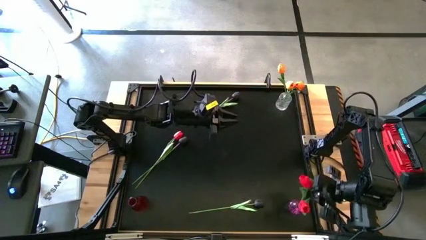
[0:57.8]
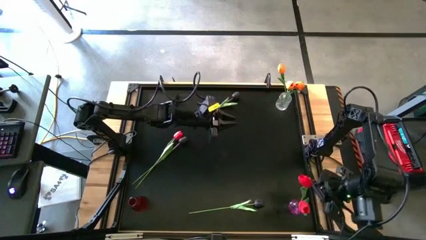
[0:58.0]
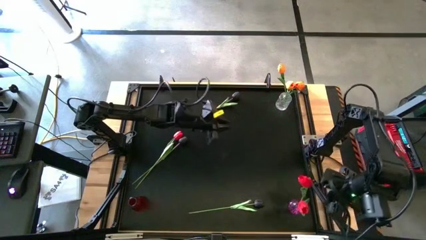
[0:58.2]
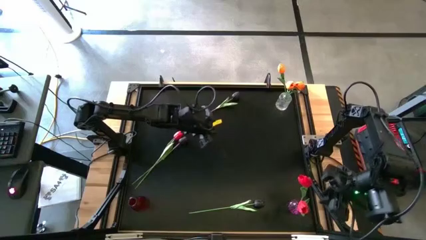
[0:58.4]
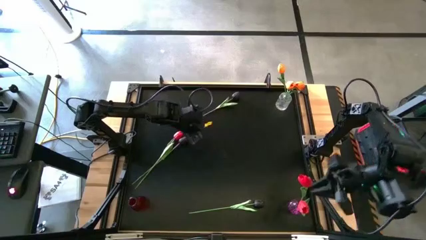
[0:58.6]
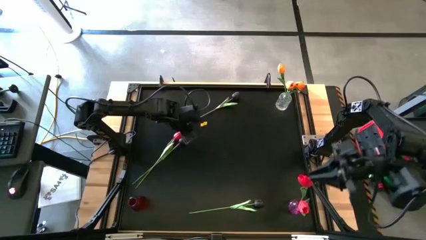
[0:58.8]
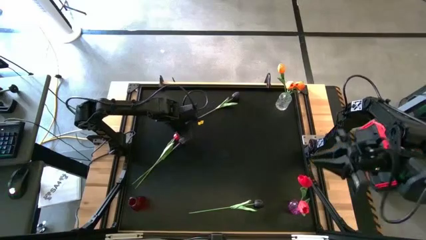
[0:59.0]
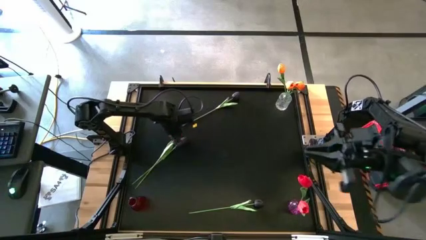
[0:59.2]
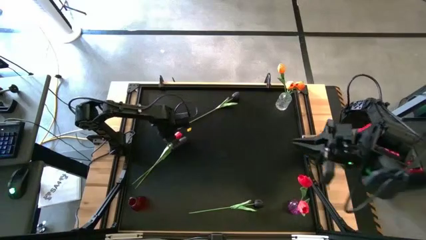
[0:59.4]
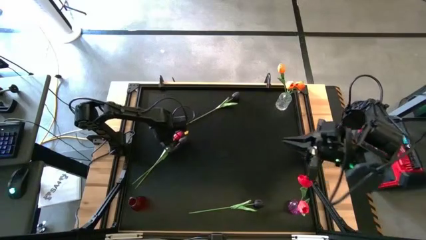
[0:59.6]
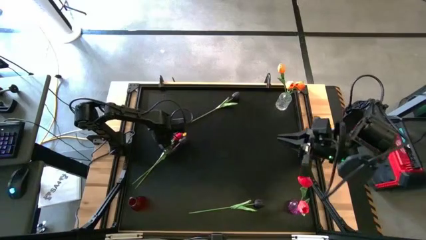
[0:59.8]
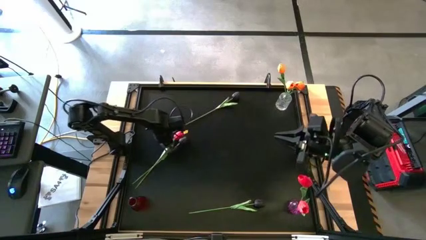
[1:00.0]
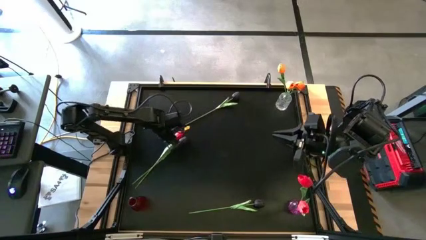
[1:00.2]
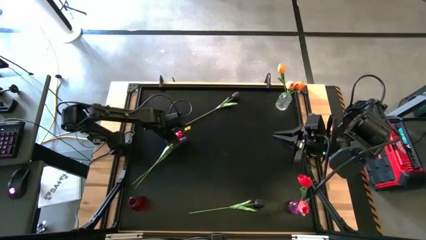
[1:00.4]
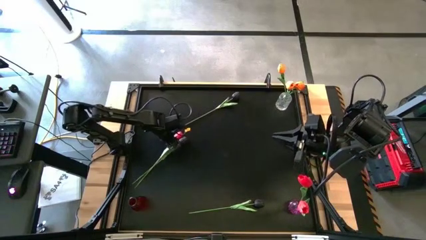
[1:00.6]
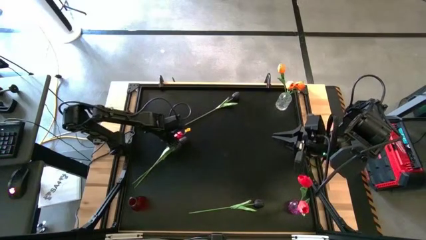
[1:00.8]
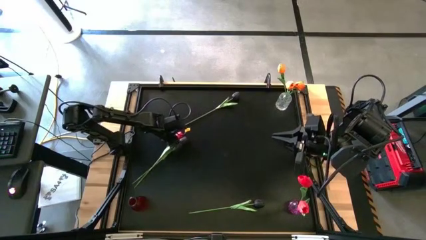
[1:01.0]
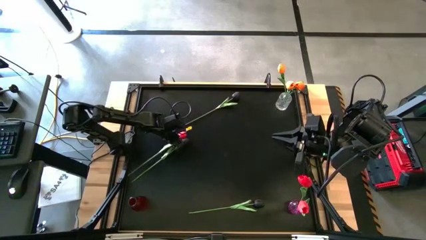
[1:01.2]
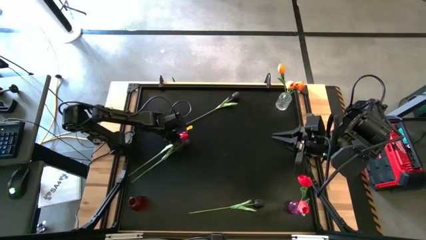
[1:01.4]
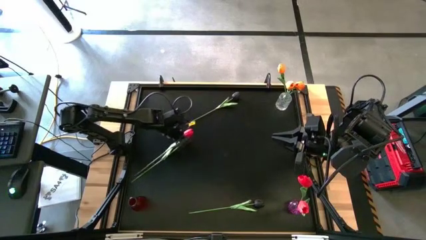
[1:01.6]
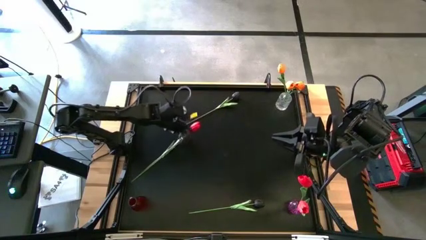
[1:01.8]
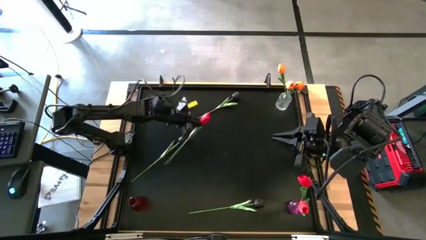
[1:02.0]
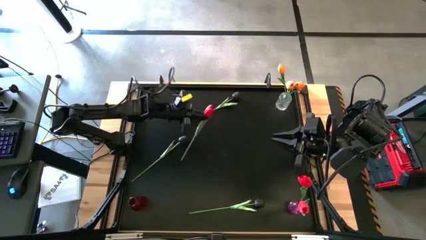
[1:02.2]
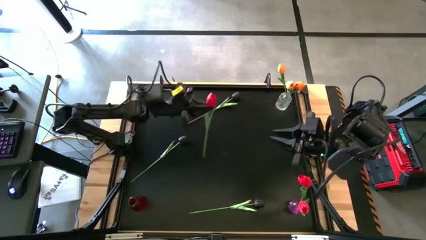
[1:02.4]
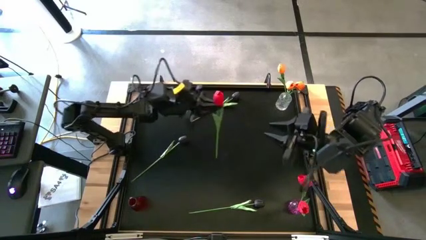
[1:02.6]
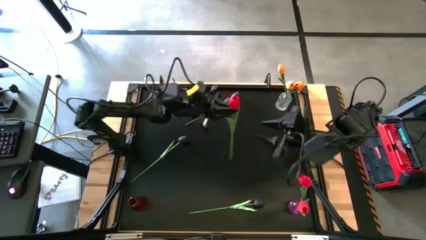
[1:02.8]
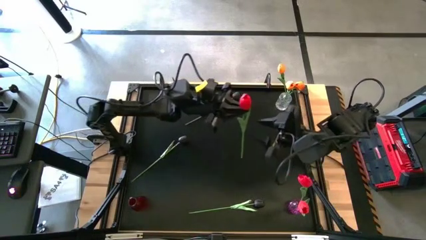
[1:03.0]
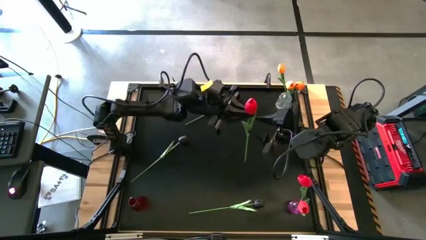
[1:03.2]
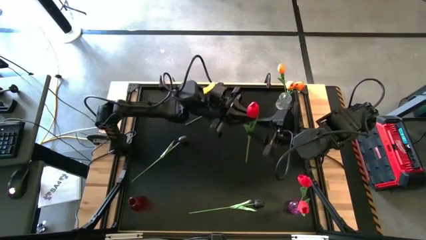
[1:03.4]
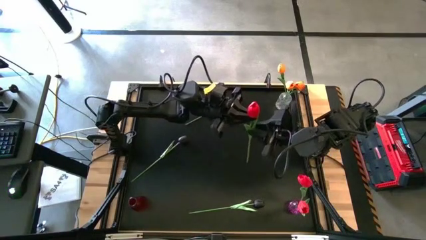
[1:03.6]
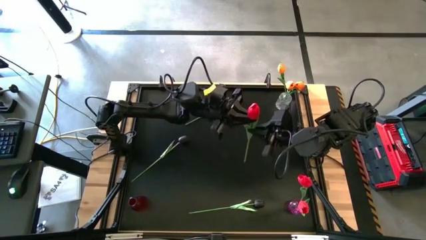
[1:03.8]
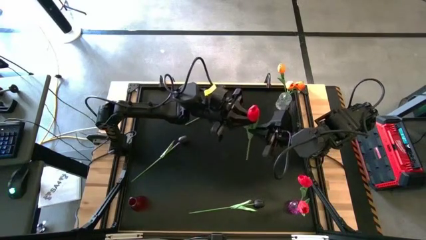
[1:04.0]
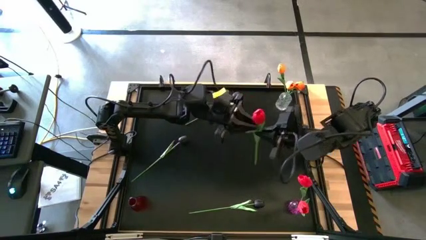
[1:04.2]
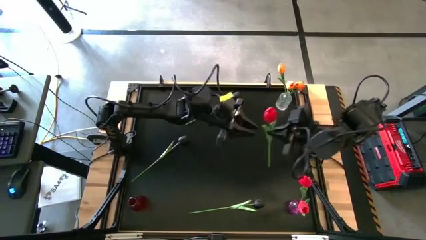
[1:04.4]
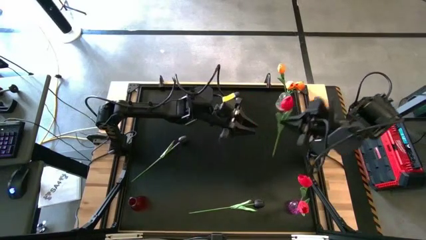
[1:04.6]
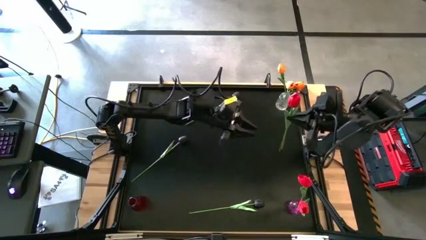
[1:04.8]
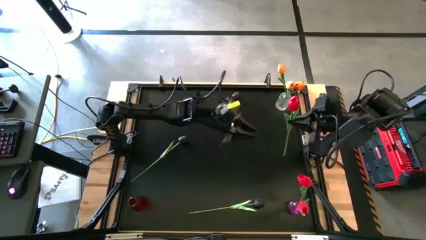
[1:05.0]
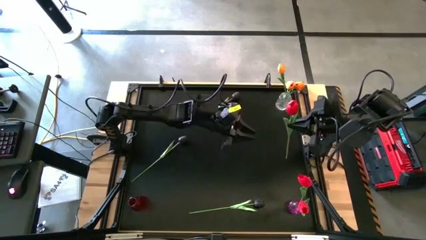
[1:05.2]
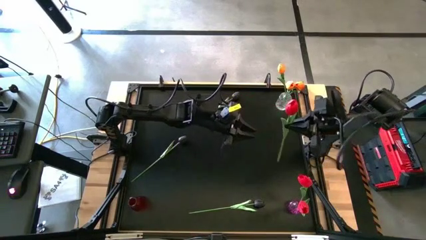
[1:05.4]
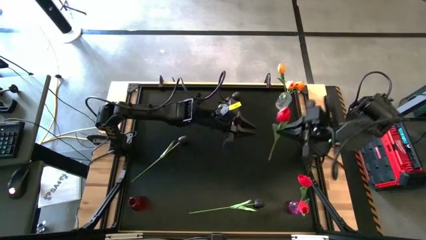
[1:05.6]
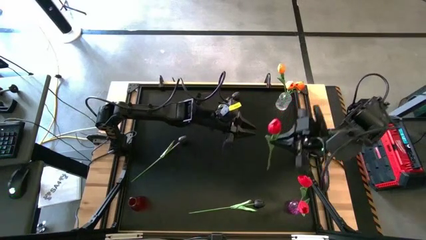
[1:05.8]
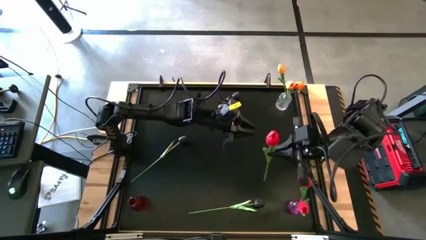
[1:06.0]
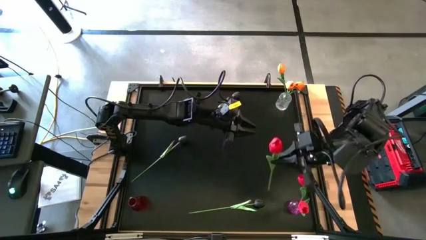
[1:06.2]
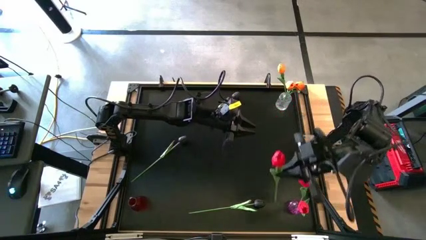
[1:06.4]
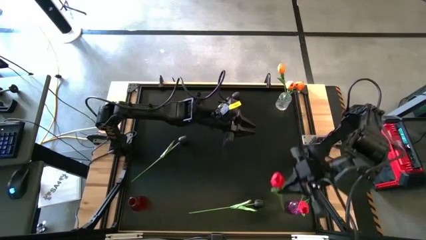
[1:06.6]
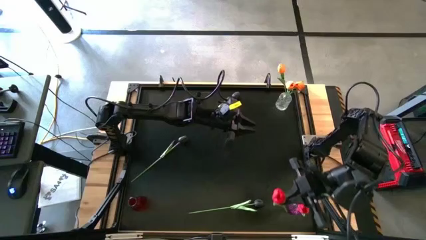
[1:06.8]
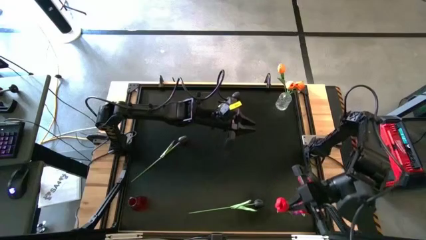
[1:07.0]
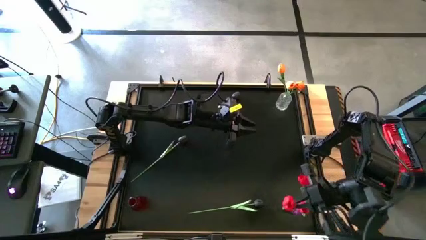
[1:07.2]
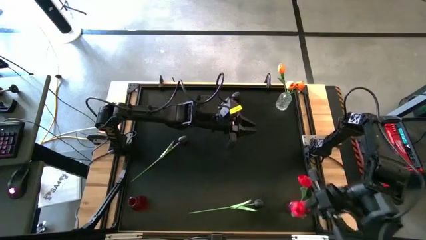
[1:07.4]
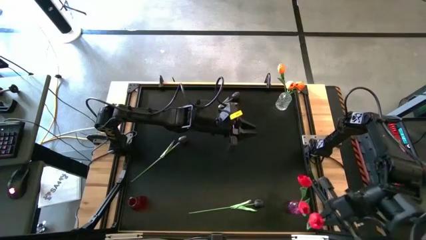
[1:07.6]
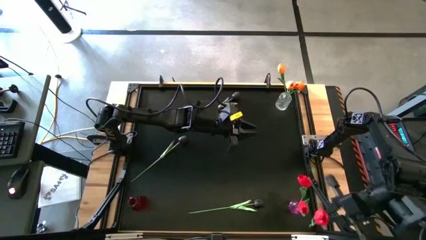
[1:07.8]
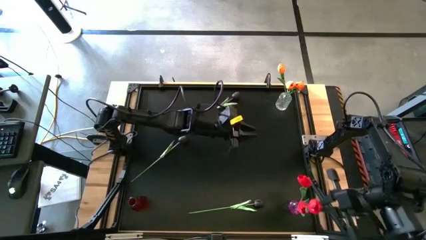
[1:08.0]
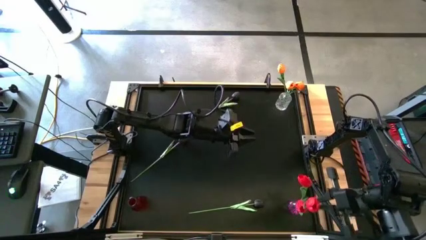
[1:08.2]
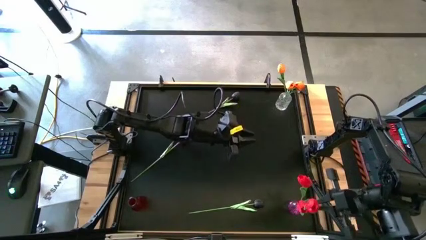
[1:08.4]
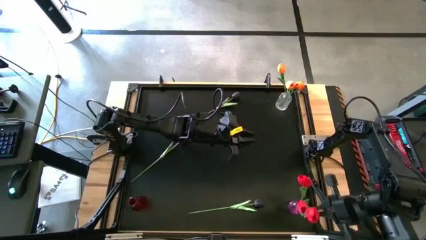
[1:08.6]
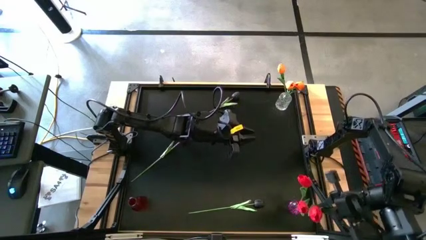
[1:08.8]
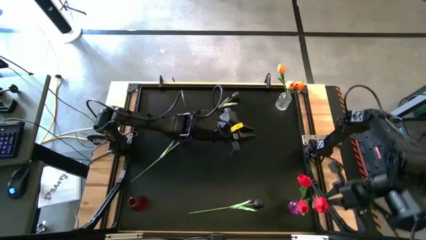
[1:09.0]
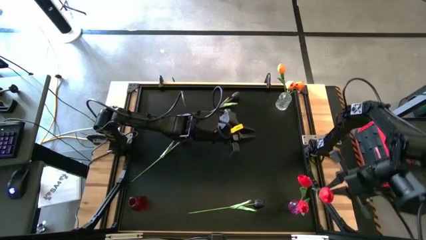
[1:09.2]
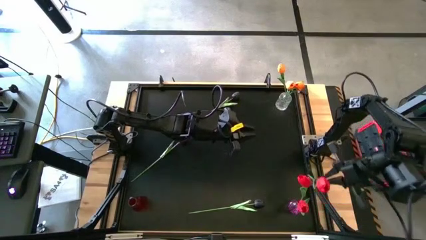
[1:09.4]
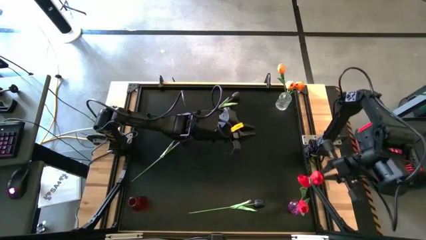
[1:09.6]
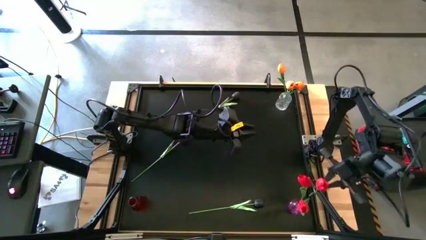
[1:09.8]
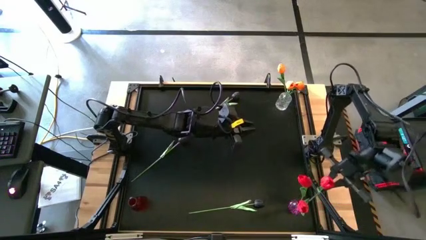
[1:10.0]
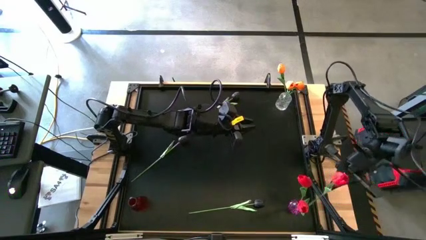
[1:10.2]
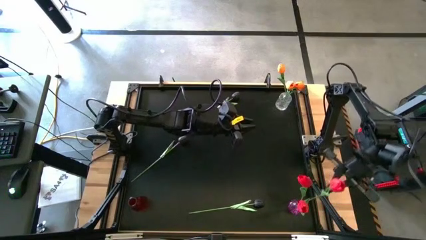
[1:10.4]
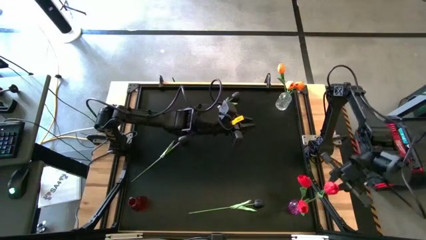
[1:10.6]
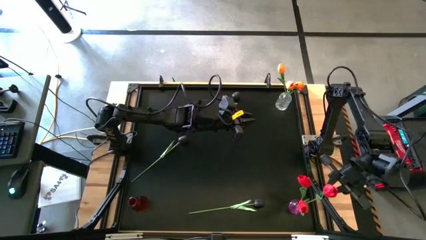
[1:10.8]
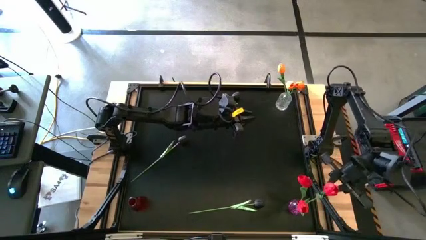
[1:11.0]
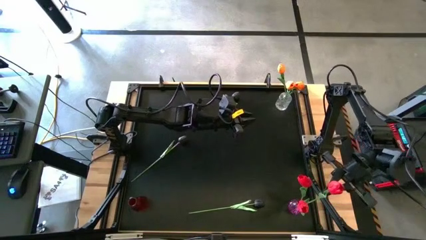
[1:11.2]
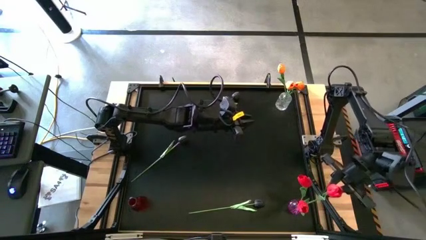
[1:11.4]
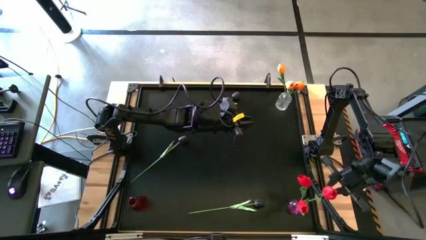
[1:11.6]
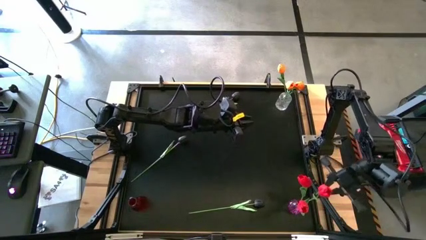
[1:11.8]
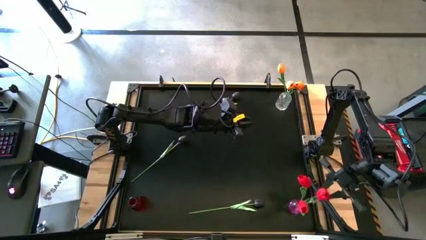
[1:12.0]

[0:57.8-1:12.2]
Task: Sort flowers into vase by color
Put the red tulip into the violet flower vase

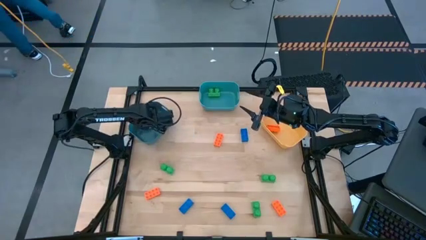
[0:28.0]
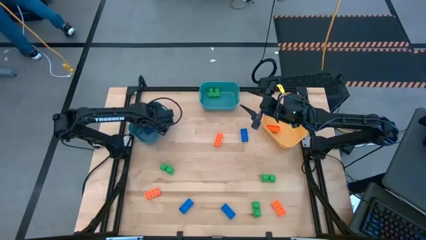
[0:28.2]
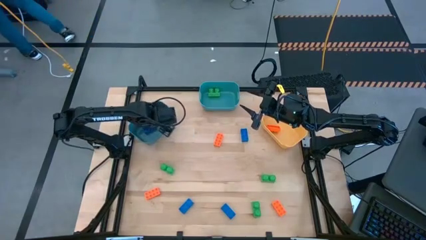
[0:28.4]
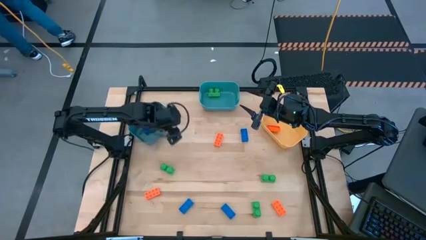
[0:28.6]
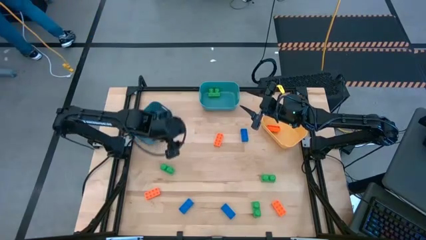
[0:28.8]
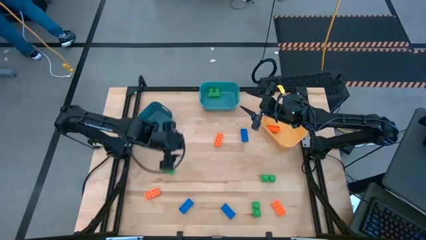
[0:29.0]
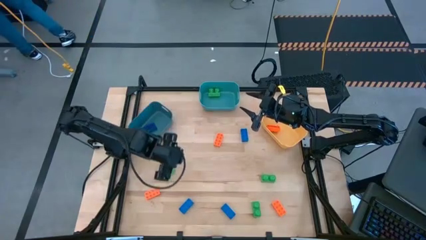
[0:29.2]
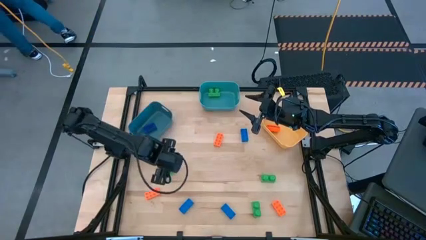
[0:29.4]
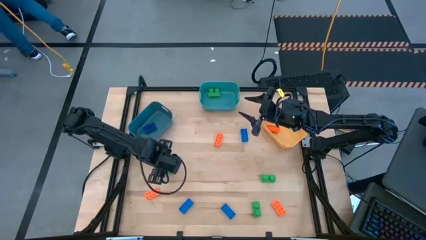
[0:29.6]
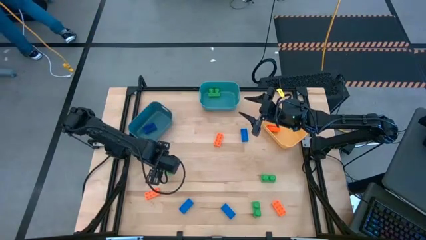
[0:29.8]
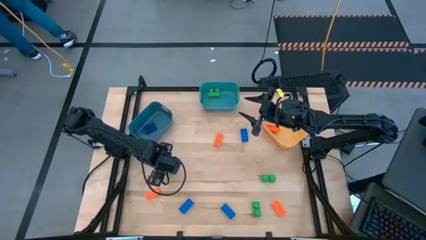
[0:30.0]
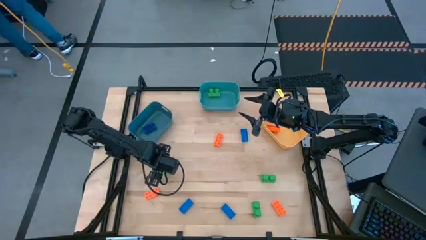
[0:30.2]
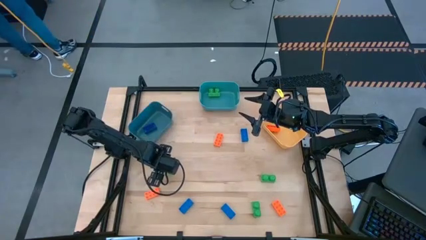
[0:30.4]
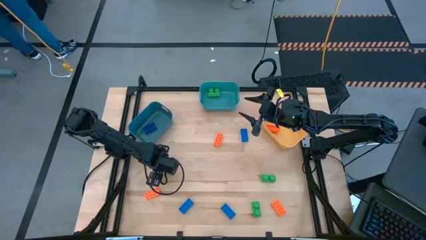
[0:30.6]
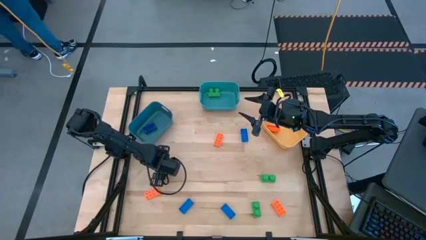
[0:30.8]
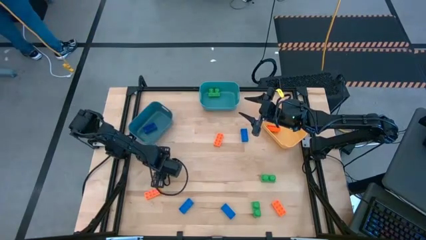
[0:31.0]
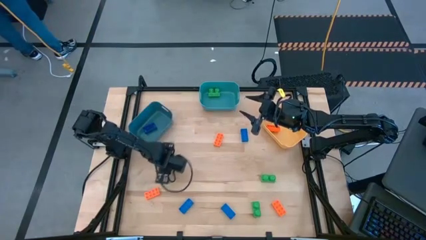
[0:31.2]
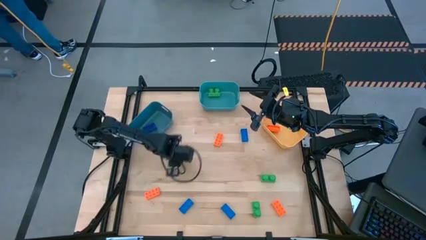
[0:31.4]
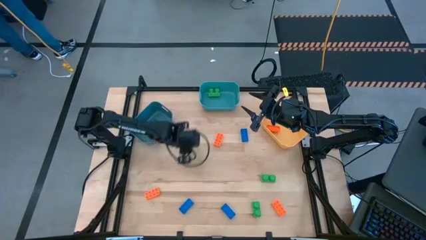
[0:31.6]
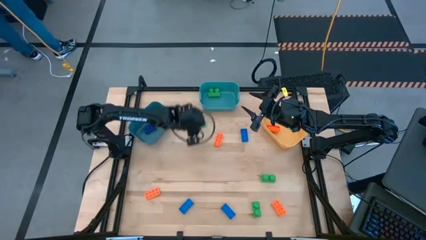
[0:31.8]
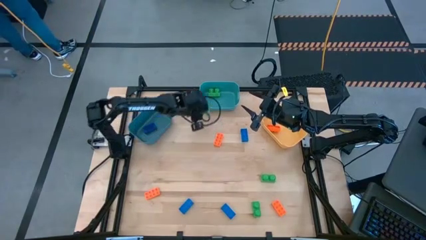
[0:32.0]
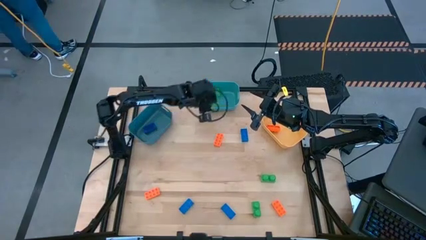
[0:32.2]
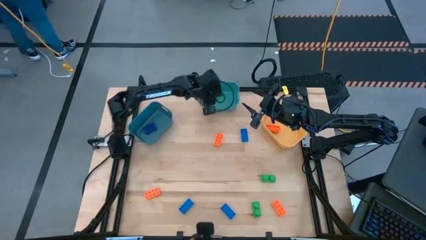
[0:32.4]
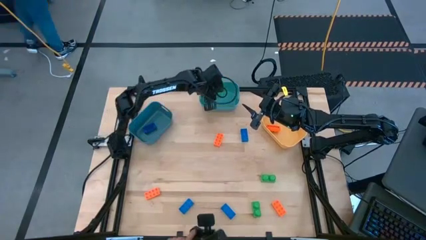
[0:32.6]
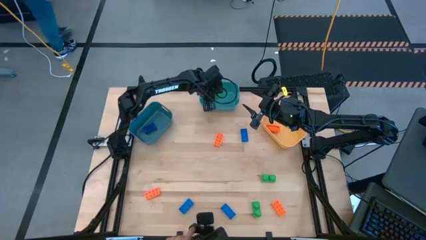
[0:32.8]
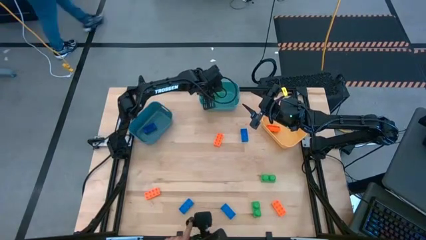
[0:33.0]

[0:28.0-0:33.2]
Task: Sort & place blocks by color
Put the green game piece into the green bin
